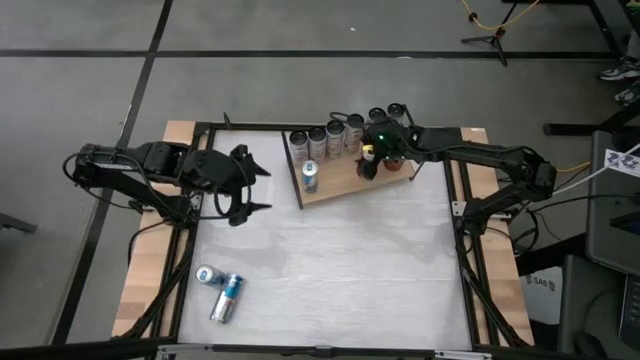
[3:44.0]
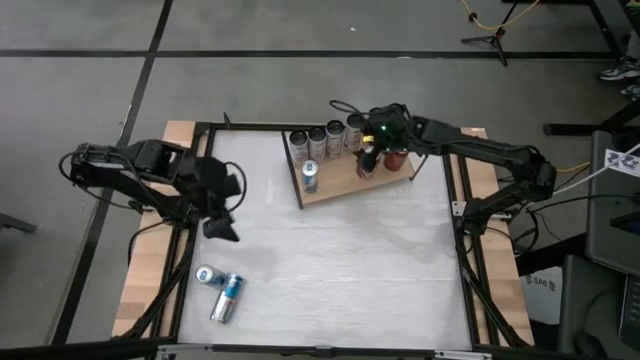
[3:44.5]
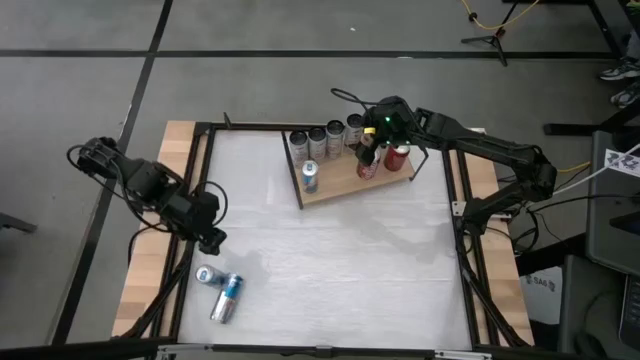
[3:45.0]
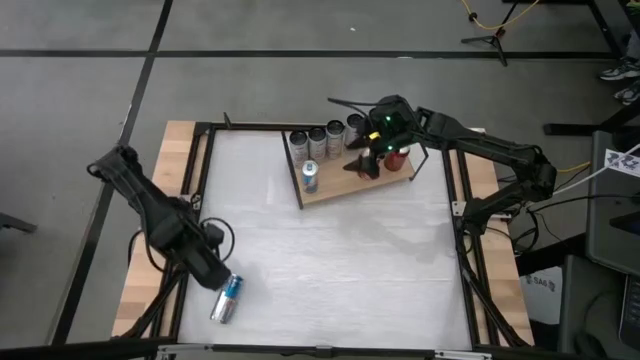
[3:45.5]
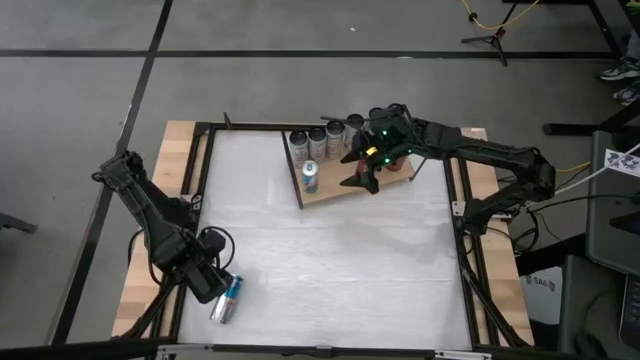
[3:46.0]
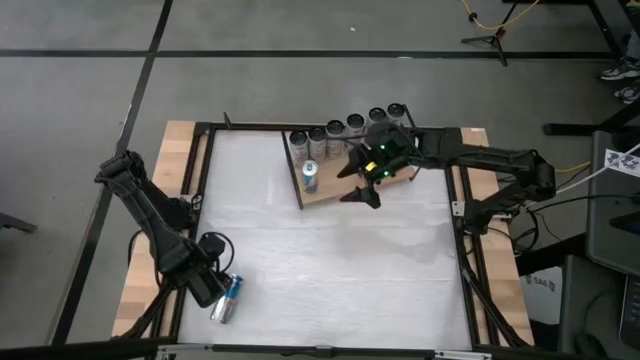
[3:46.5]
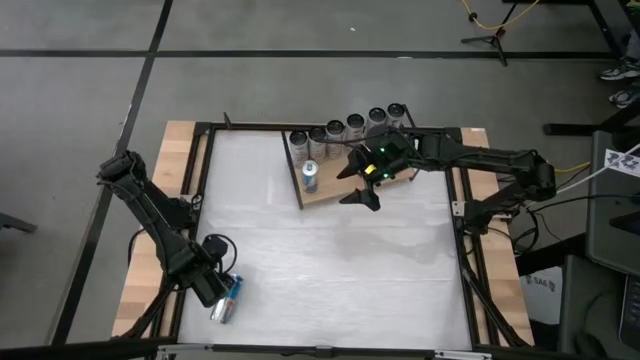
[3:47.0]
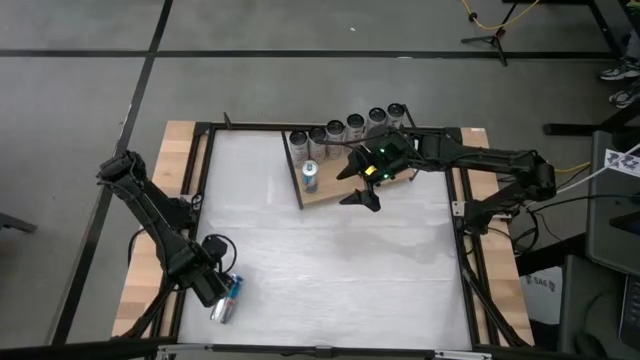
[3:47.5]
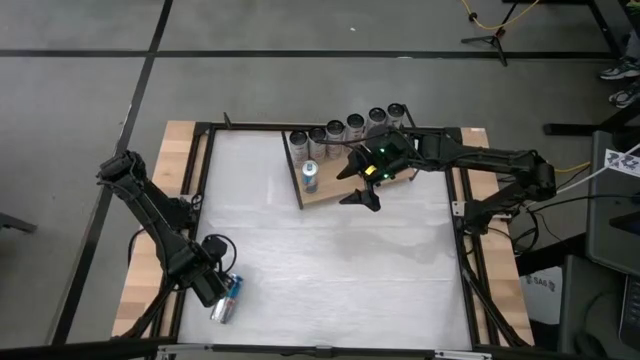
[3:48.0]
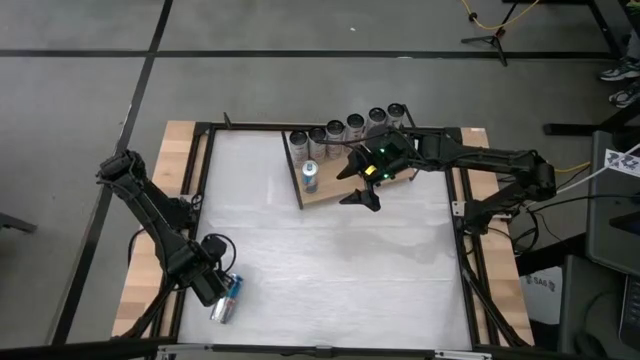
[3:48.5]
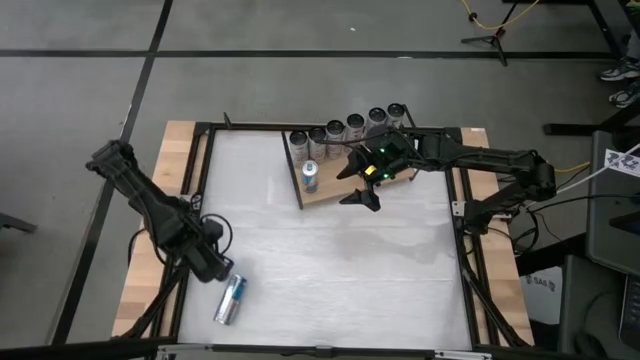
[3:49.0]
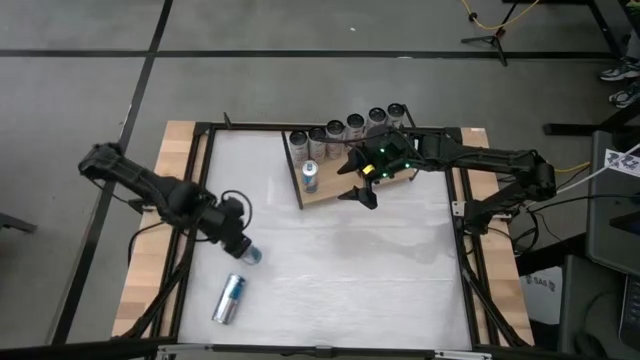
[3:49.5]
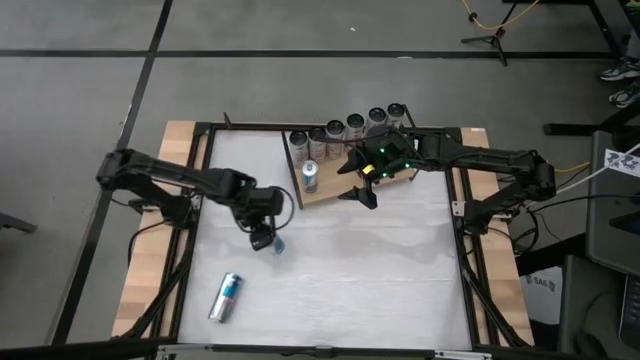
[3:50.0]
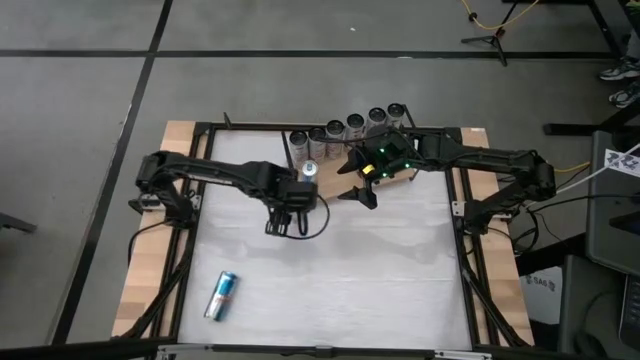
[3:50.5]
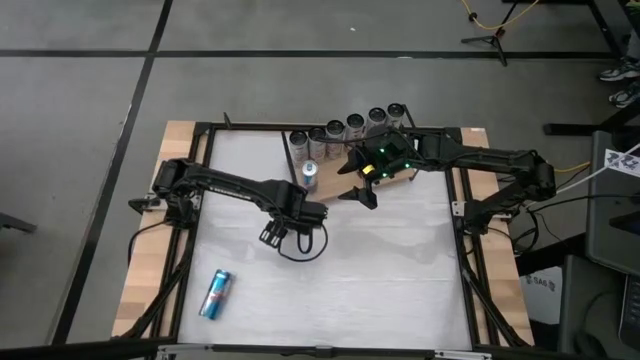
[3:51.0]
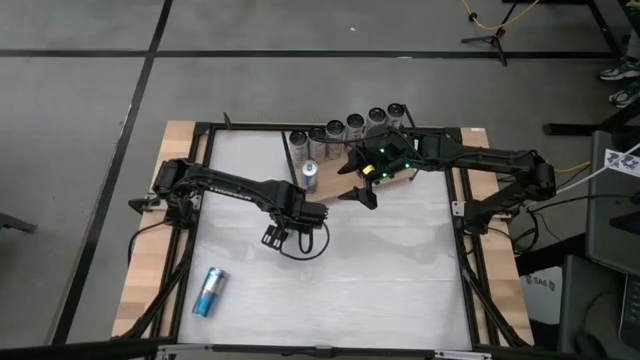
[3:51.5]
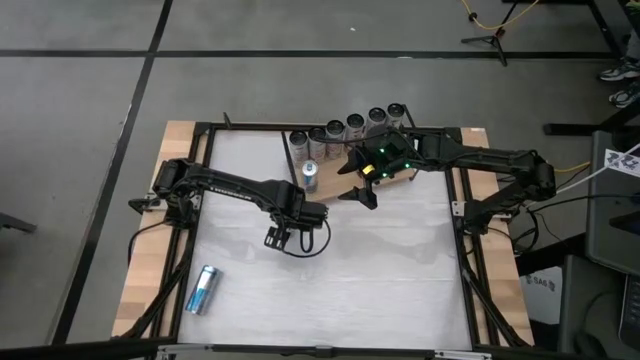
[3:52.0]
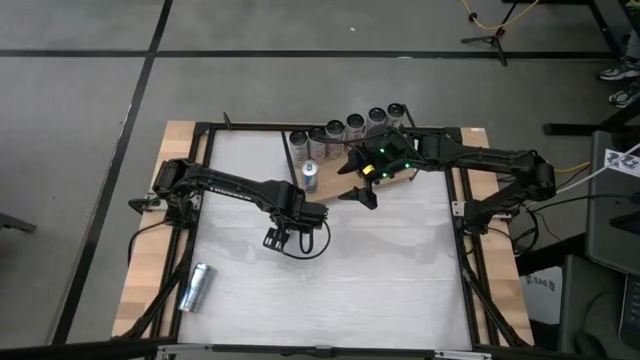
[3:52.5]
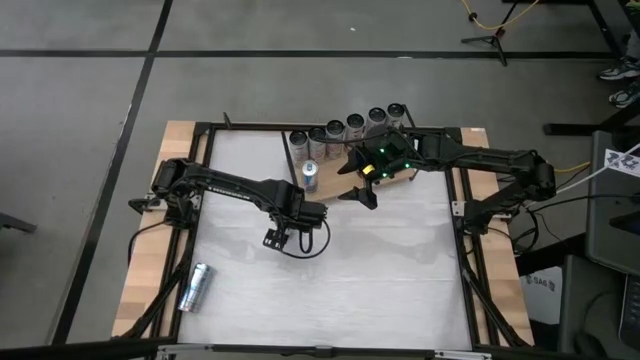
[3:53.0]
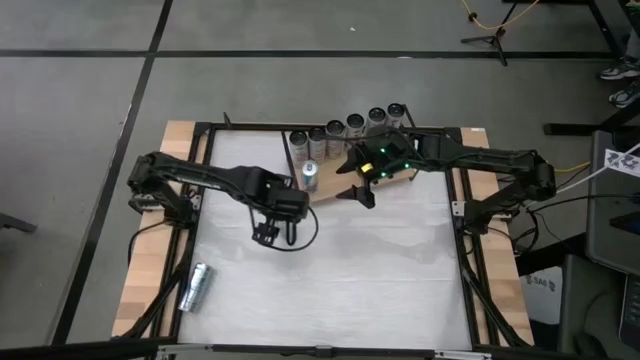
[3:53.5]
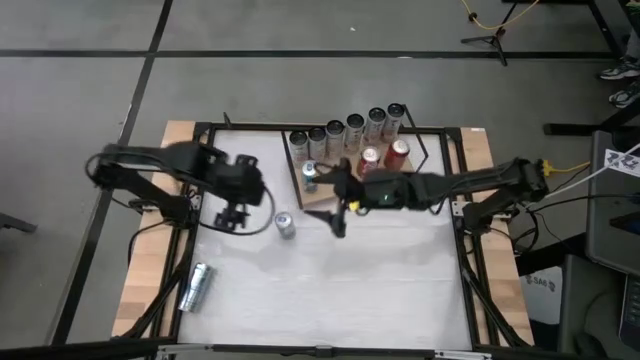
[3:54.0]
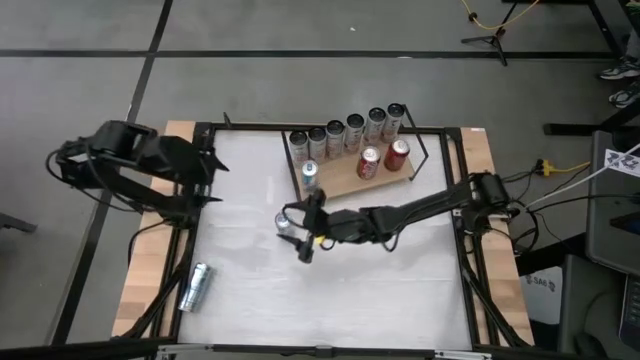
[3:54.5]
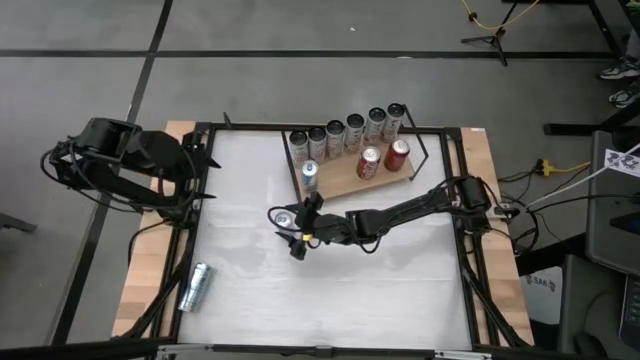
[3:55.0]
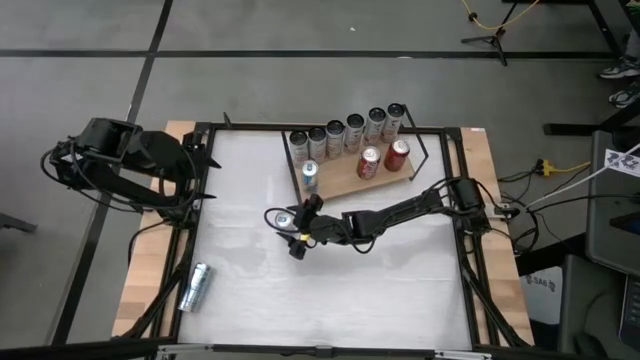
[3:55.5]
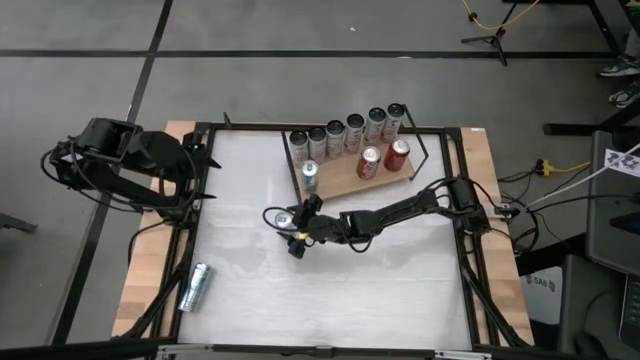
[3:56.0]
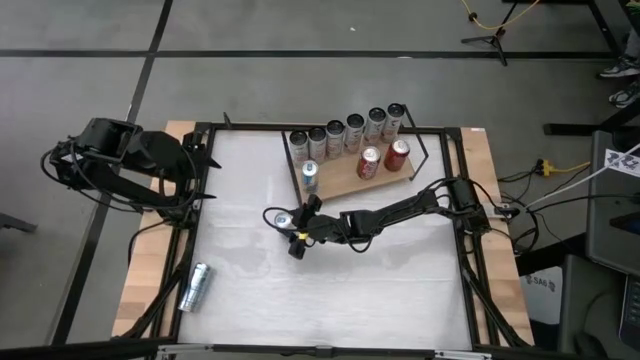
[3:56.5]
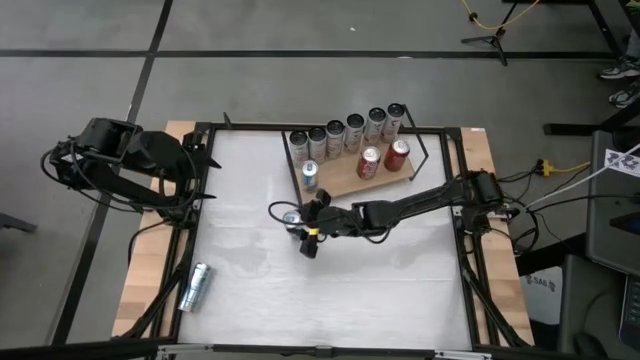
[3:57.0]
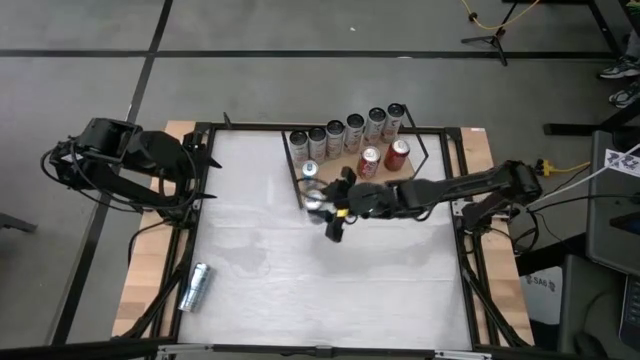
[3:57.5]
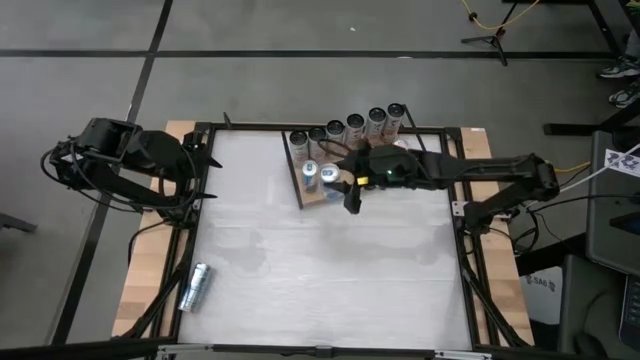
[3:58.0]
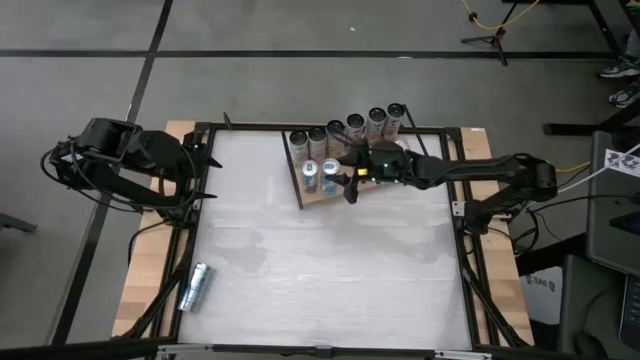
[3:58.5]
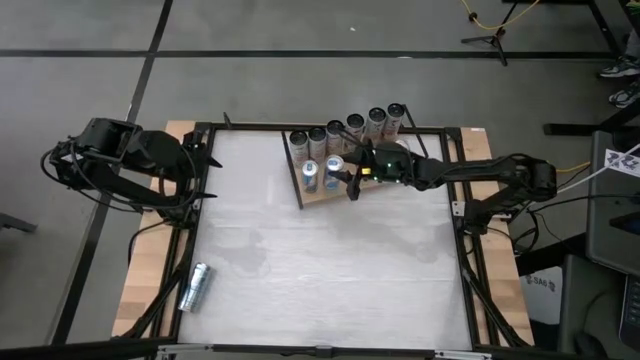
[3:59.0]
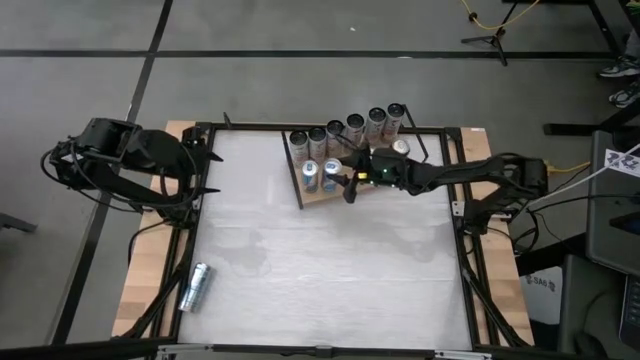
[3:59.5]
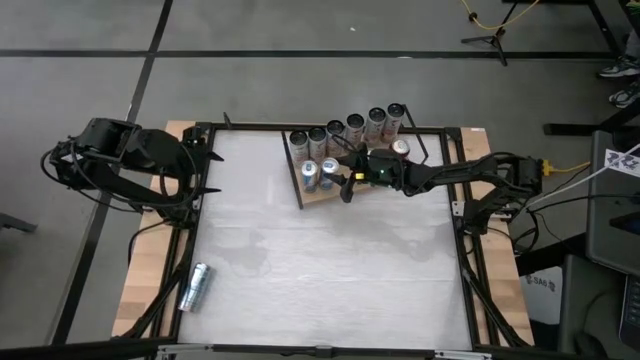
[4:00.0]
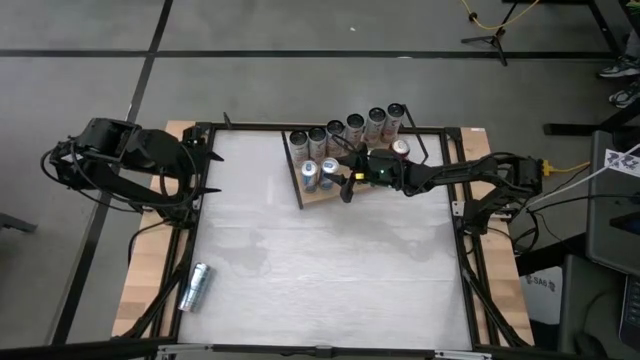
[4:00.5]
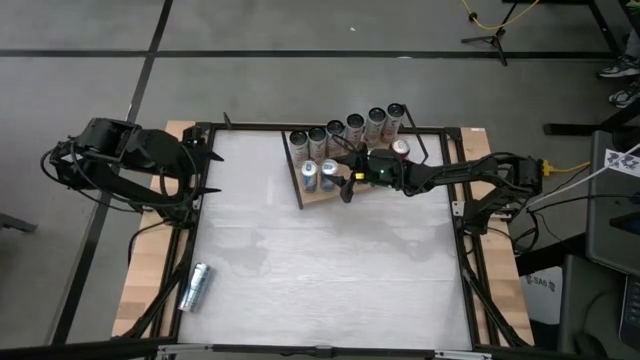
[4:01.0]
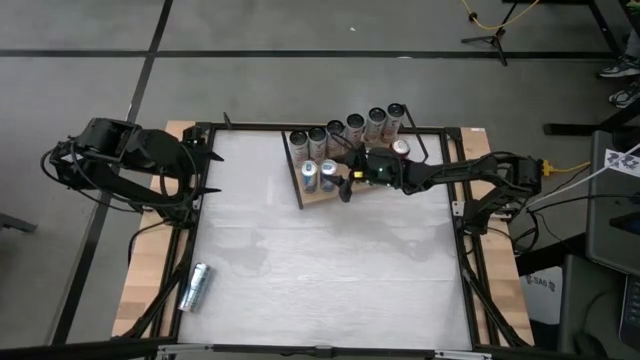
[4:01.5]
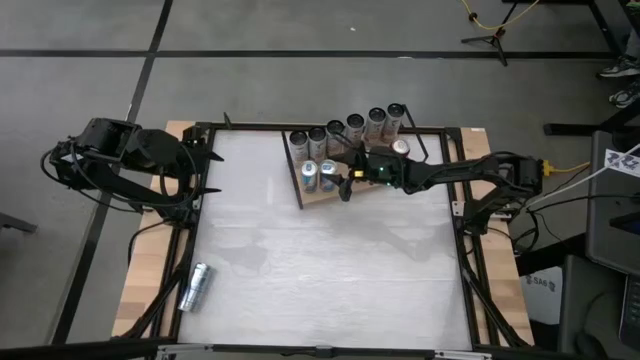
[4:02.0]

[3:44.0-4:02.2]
Task: Place canned beverage on shelf
Put the blue soda can on the shelf aligned with the other blue soda can

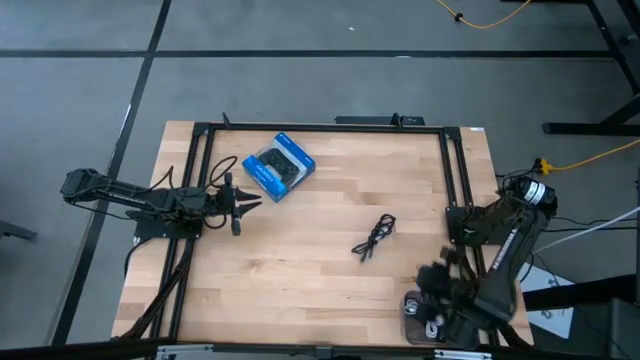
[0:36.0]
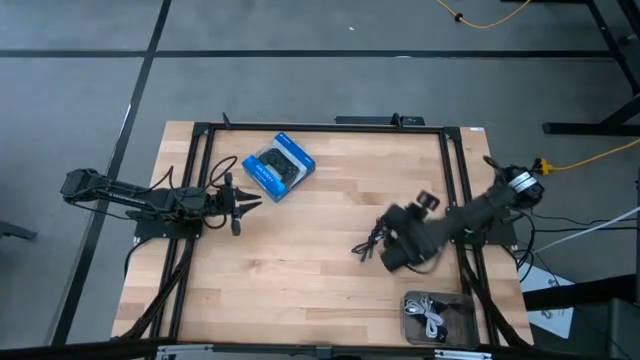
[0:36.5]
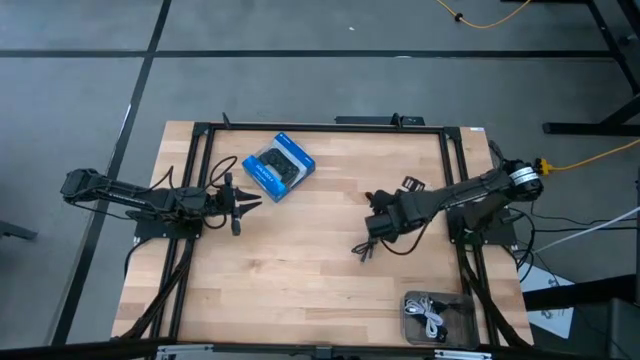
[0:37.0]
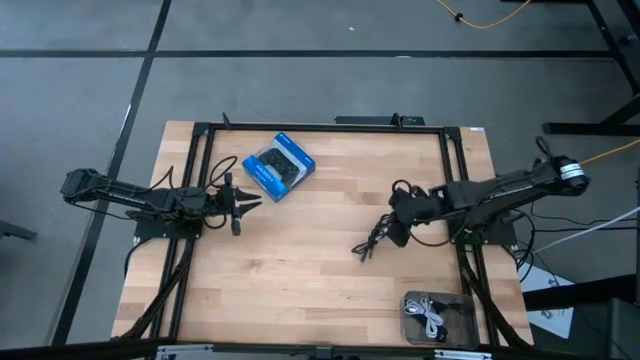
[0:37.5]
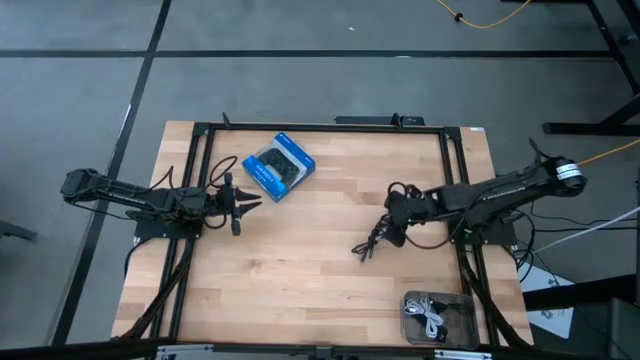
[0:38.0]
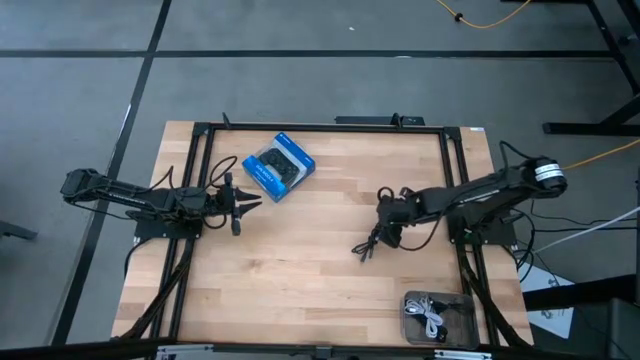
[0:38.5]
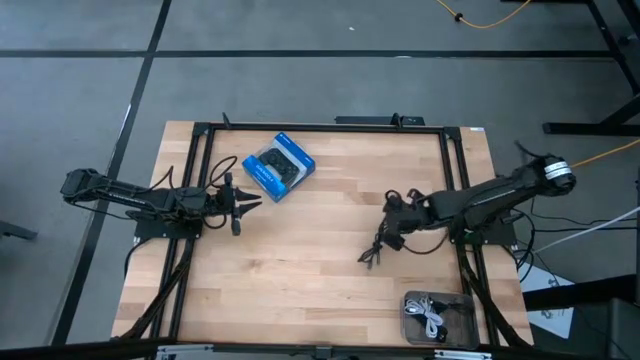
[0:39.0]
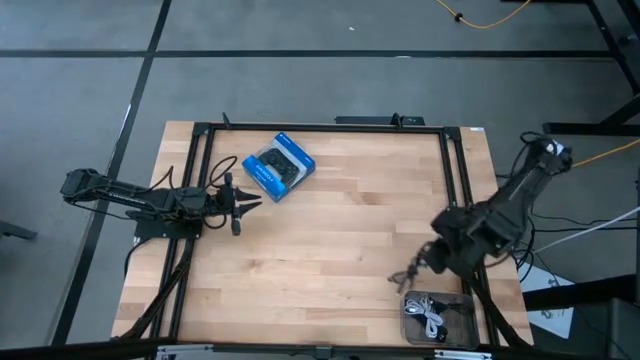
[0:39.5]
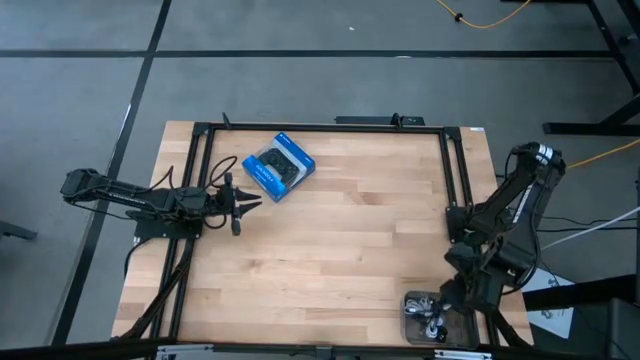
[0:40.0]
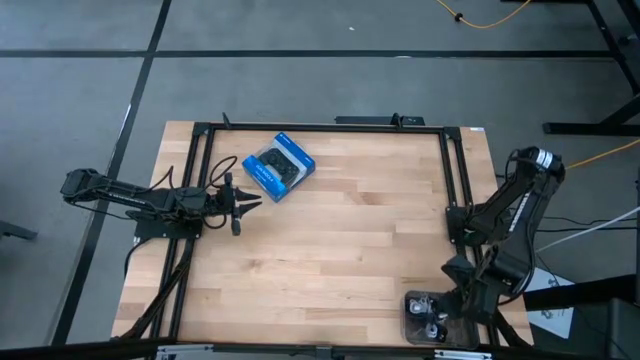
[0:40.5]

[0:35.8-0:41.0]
Task: Pick and place USB-C Cables
Put the black charger cable into the black bin
